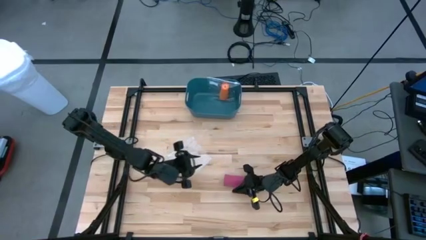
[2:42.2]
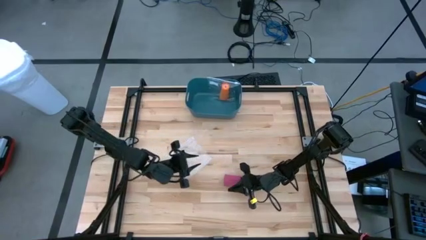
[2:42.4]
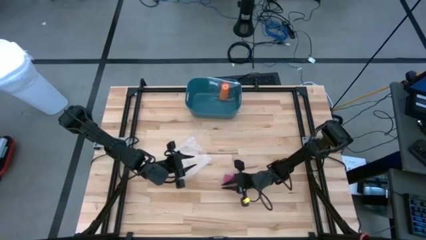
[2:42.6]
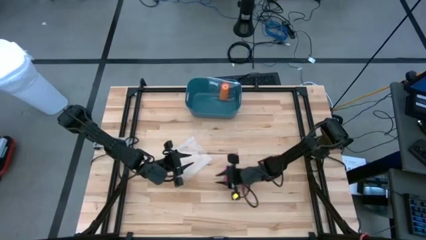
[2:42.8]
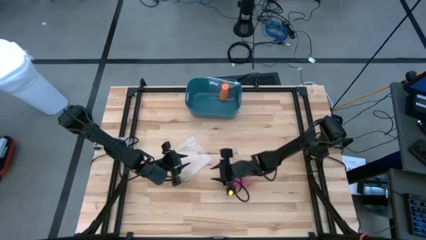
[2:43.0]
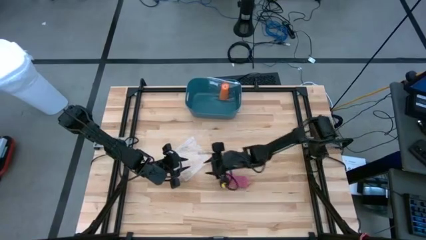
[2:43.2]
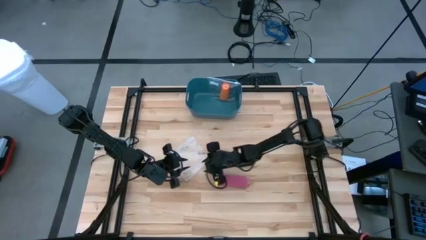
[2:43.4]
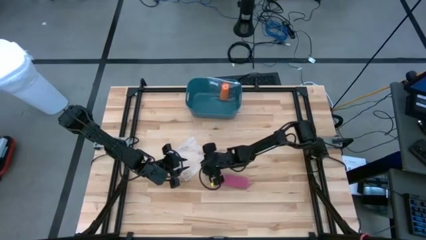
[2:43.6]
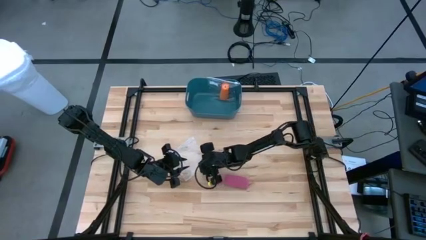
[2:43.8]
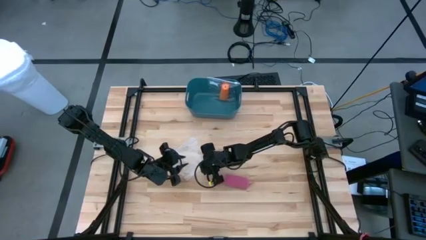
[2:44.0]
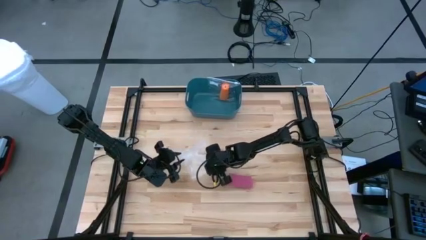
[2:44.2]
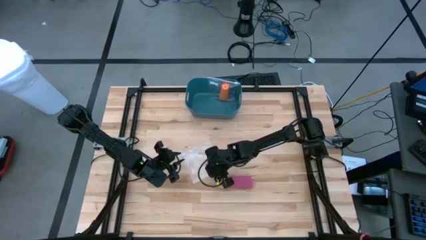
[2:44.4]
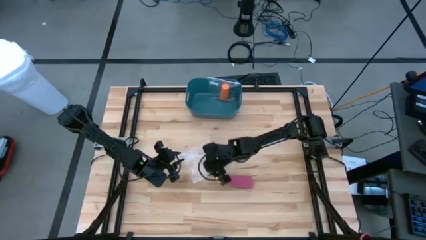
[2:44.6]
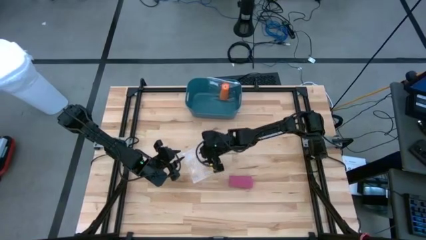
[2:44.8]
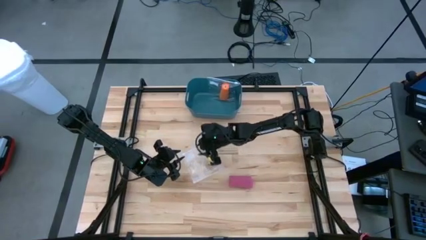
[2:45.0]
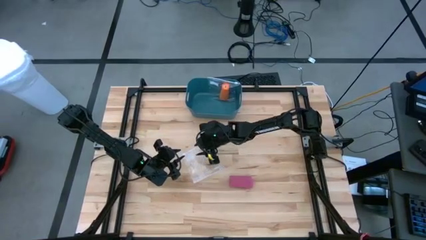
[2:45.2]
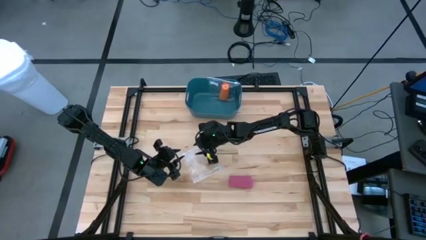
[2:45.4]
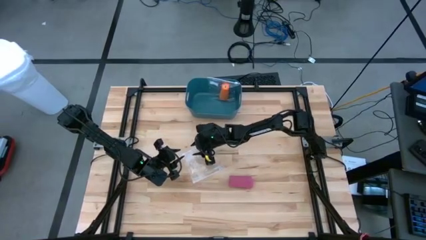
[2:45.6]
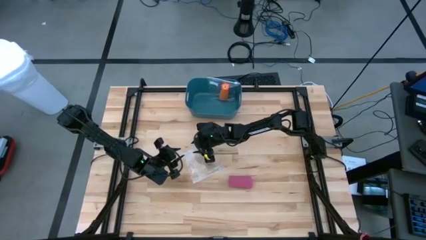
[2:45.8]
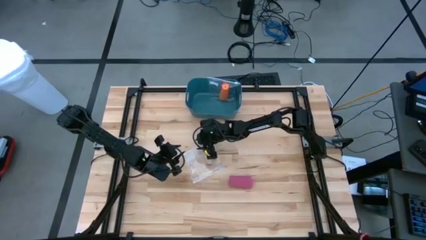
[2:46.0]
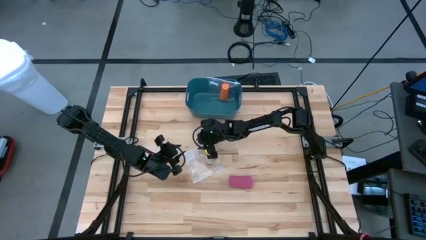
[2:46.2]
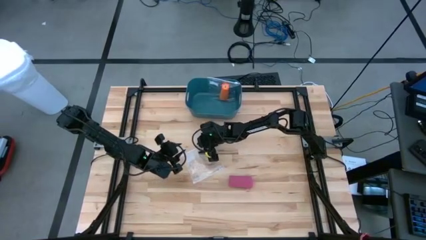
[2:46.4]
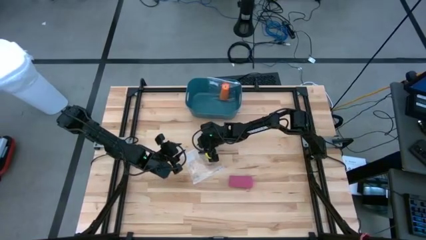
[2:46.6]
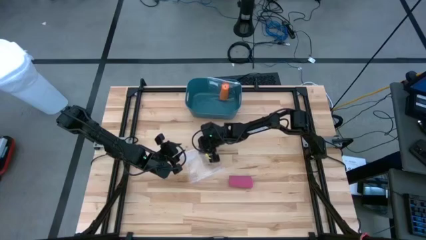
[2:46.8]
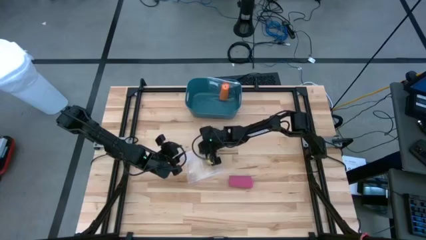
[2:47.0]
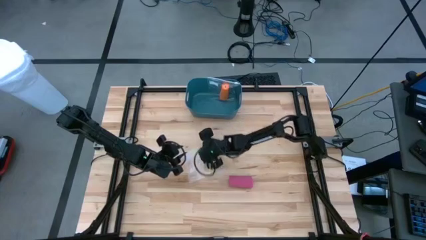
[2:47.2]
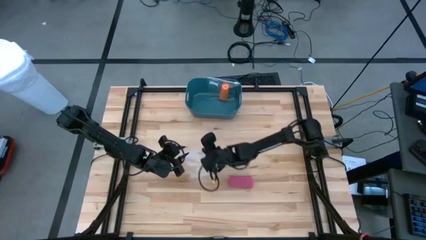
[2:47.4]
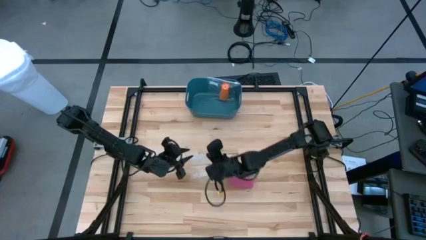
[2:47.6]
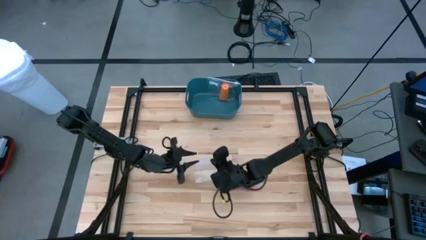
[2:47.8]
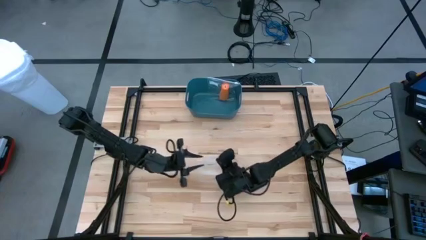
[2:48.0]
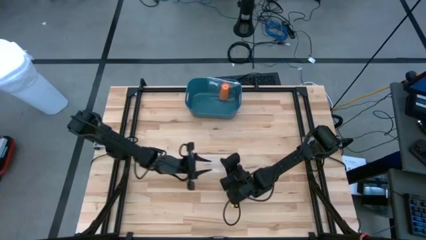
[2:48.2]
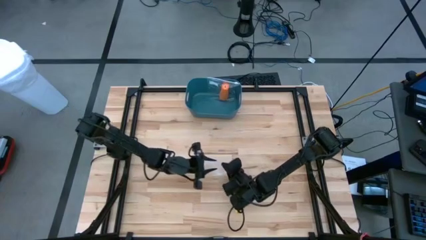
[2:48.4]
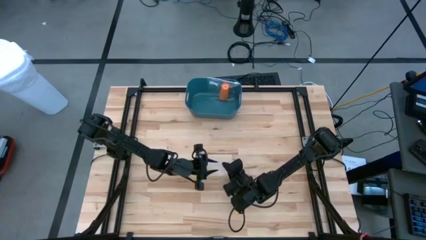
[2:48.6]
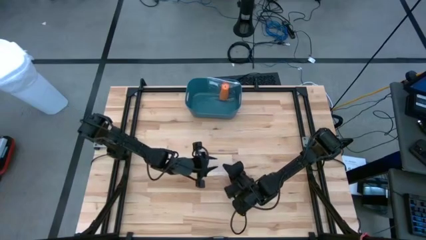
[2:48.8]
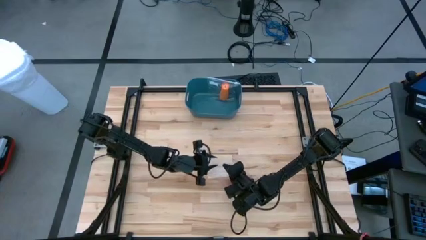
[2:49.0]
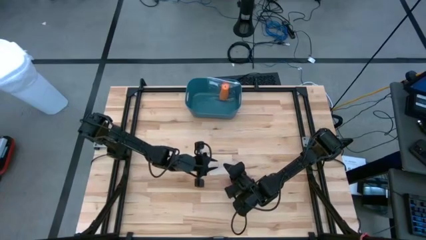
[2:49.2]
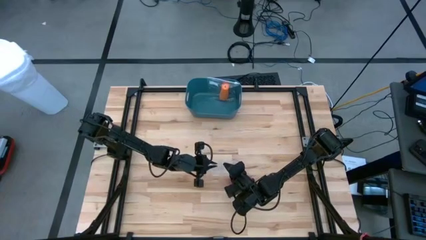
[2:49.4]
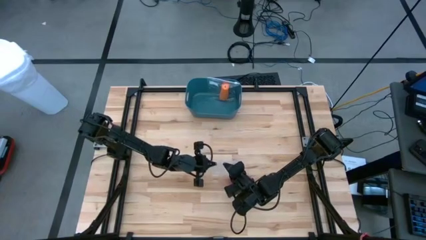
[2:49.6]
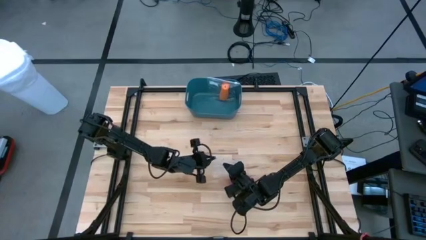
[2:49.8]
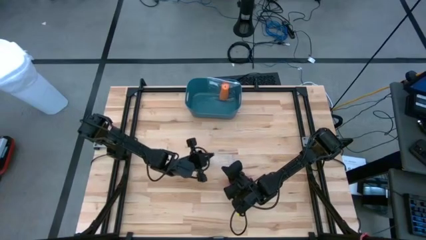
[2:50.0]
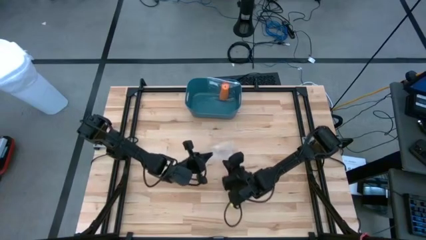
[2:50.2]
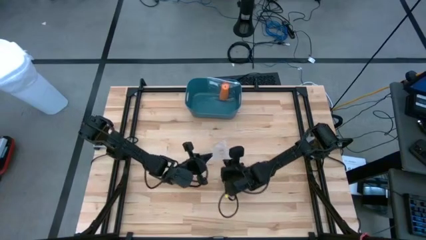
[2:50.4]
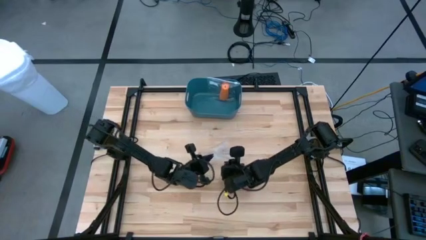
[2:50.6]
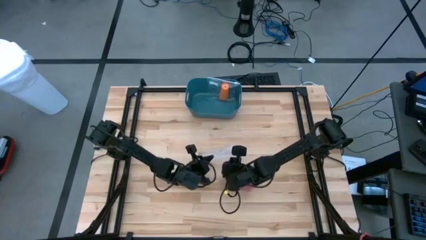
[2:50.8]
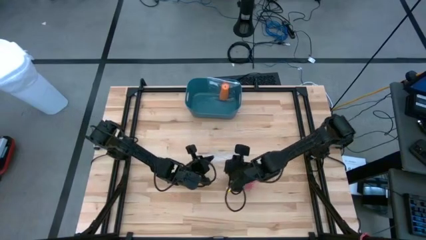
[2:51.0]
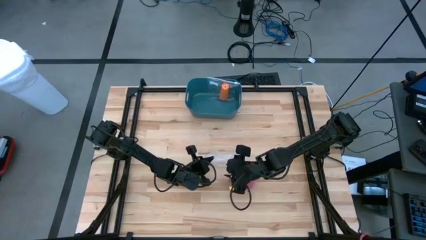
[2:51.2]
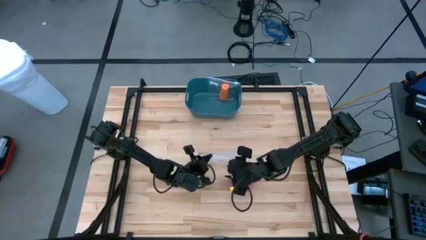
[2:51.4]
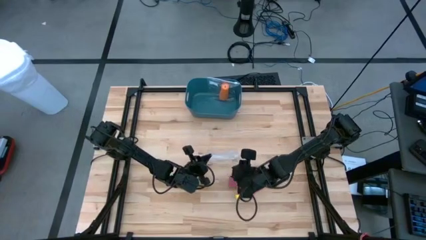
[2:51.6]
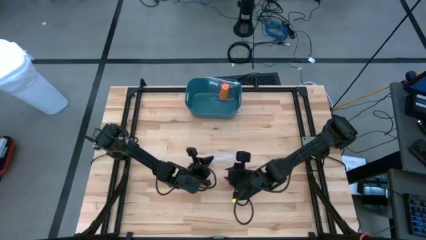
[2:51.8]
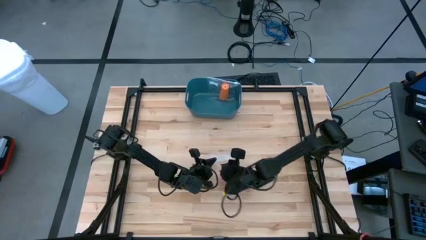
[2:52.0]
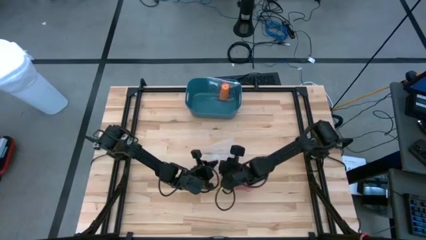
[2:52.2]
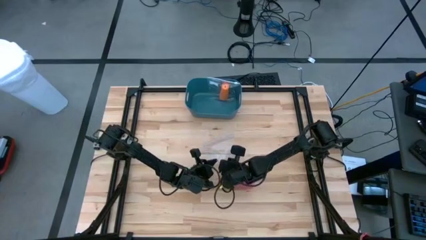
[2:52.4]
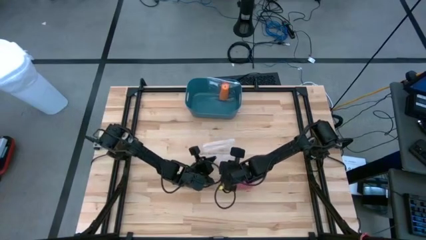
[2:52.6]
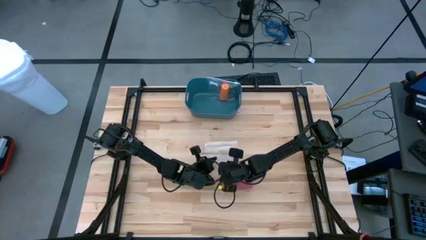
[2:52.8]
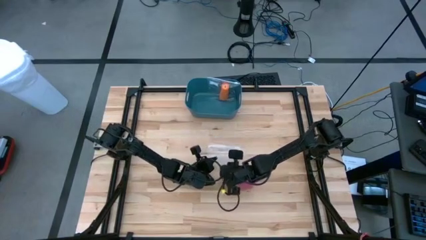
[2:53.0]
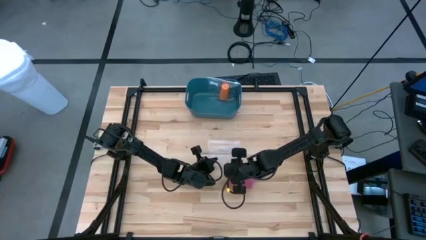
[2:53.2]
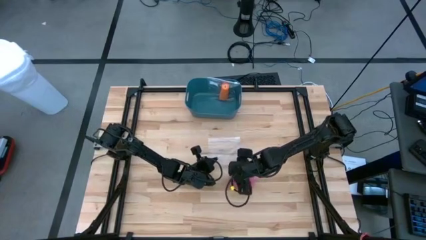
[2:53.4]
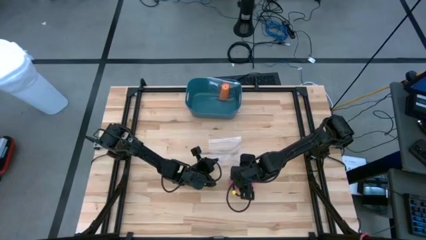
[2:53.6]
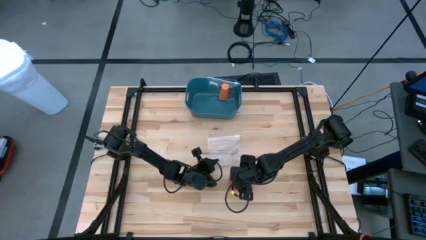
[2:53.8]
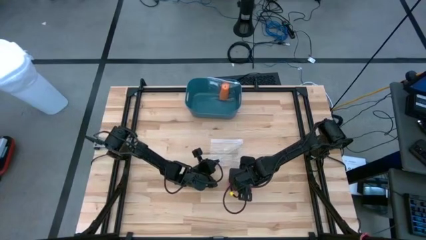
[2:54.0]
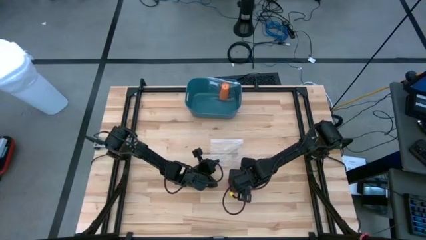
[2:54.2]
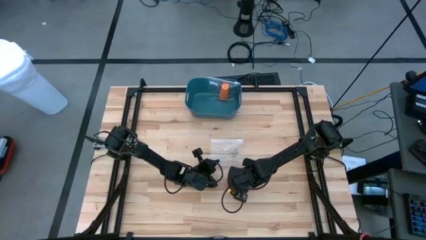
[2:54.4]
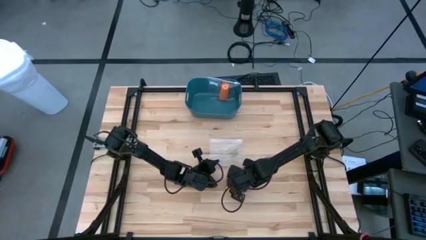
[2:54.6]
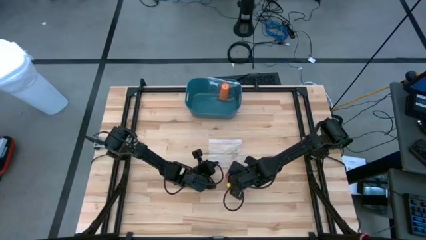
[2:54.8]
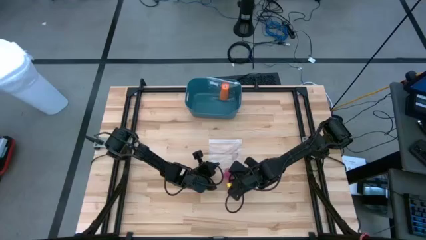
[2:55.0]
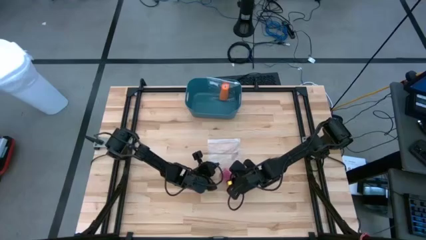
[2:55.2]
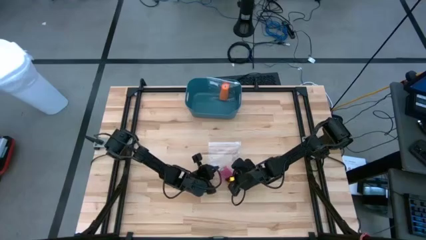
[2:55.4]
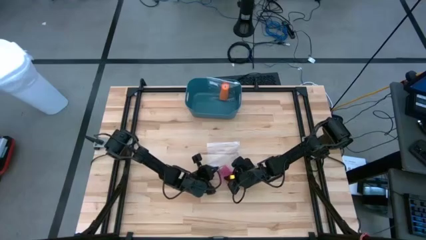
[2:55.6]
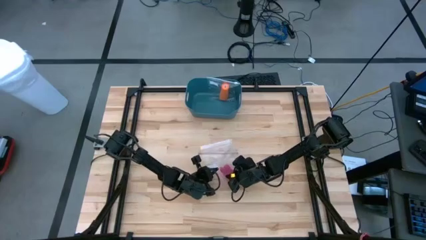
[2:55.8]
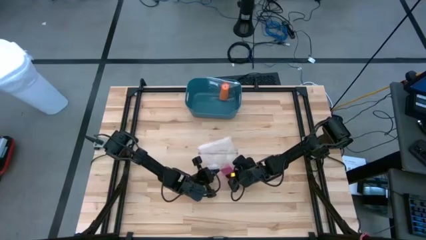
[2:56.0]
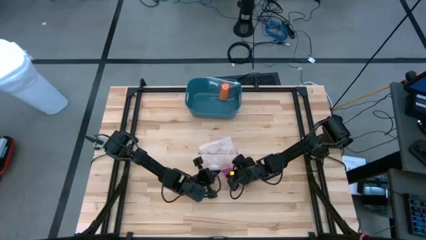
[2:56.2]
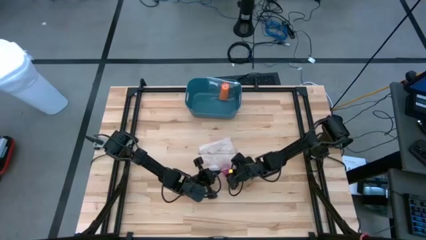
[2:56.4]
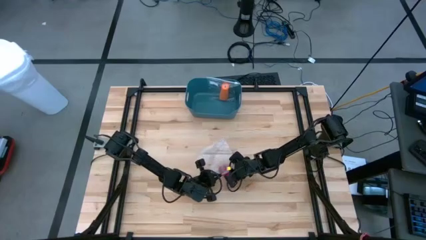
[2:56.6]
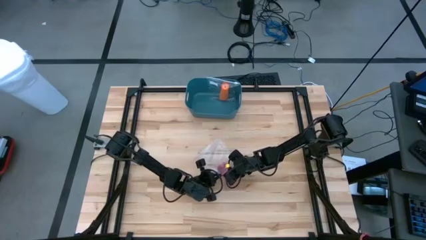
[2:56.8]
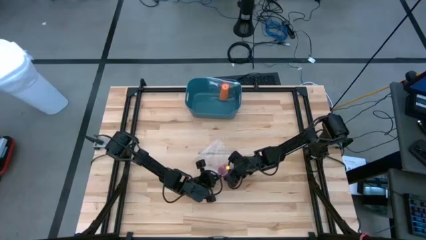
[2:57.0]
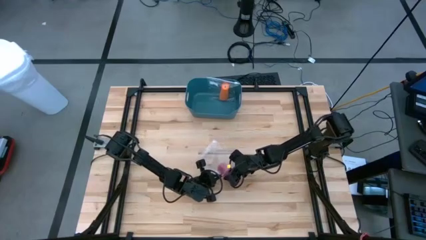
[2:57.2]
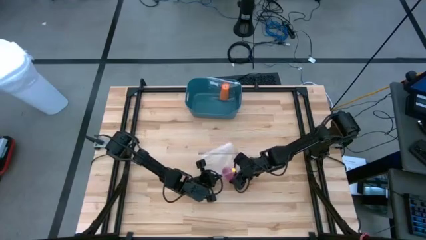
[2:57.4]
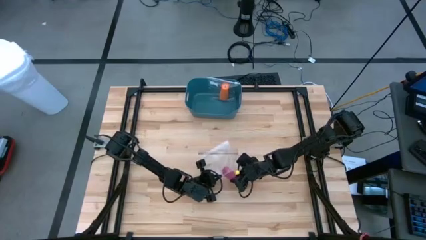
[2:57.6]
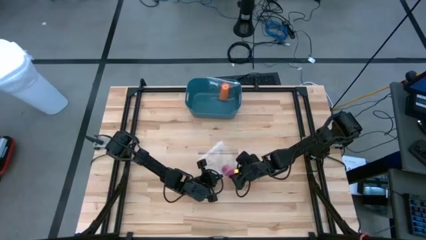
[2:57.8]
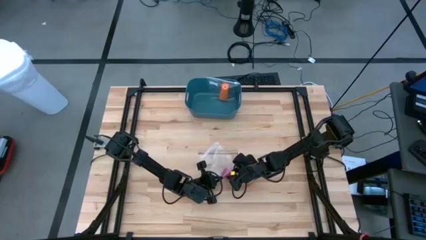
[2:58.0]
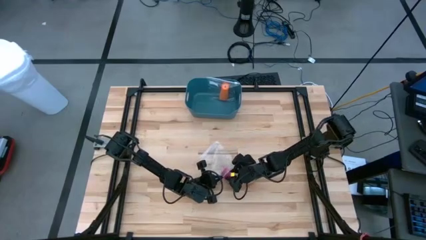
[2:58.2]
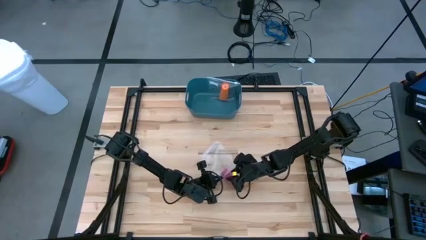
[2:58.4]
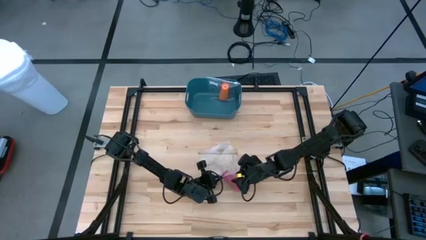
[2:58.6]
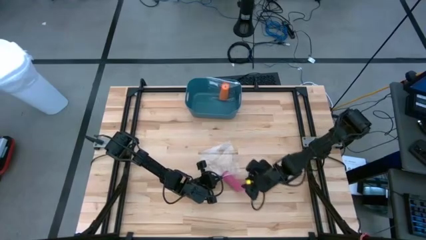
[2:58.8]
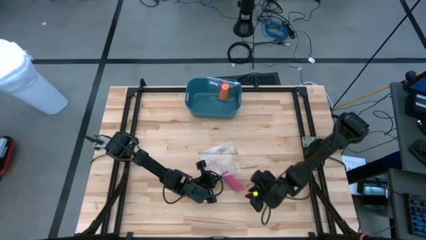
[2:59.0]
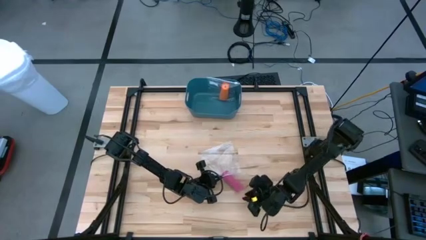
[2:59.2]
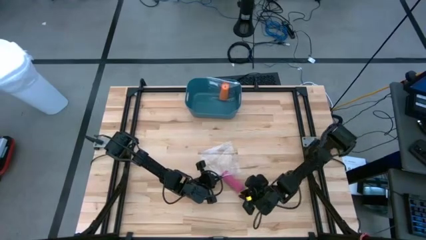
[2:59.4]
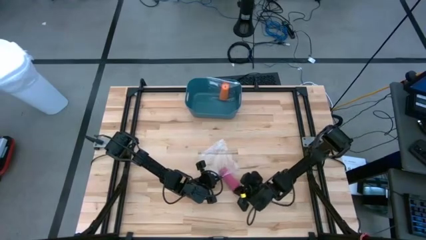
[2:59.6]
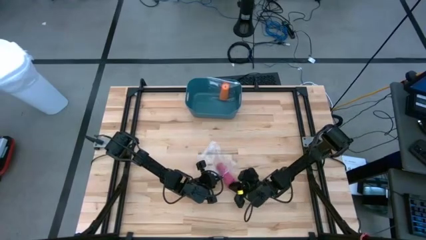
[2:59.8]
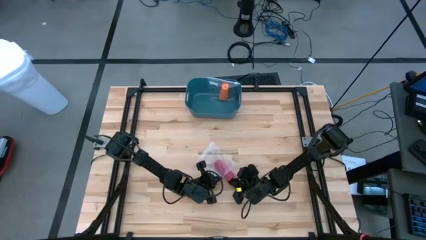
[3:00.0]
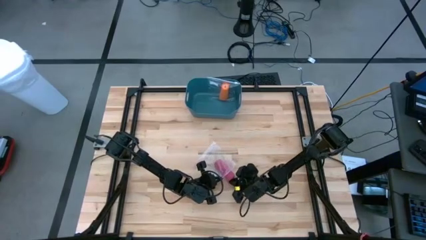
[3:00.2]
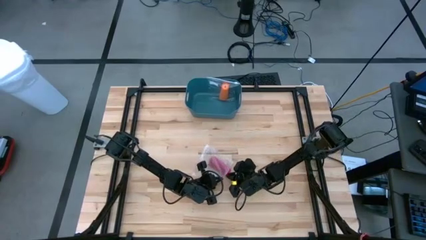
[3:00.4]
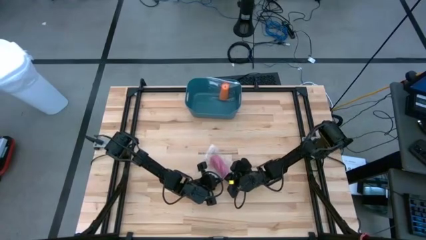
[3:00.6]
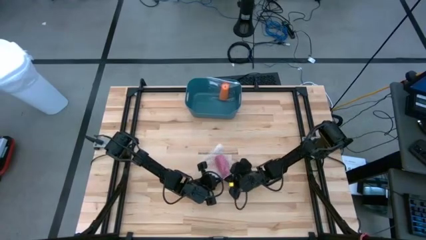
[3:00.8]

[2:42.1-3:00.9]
Task: Roll bandage
Put the rolled pink bandage into the transparent zip lock
